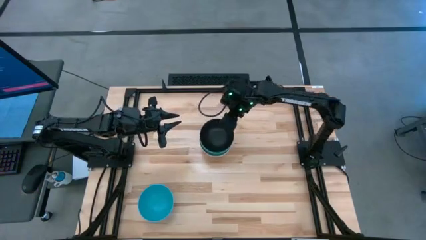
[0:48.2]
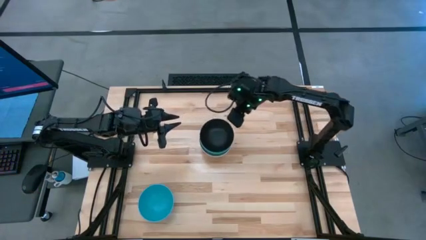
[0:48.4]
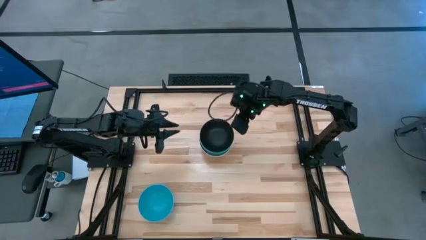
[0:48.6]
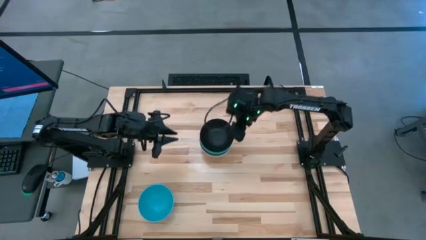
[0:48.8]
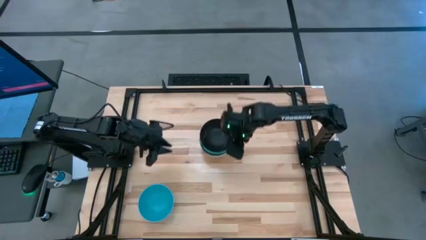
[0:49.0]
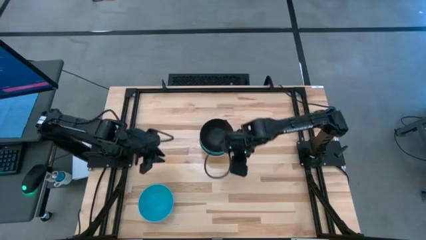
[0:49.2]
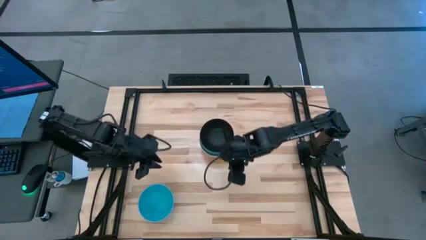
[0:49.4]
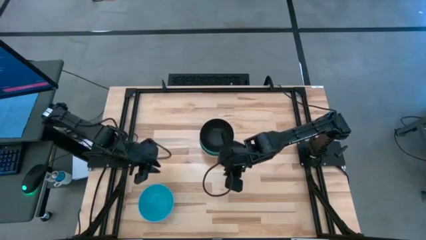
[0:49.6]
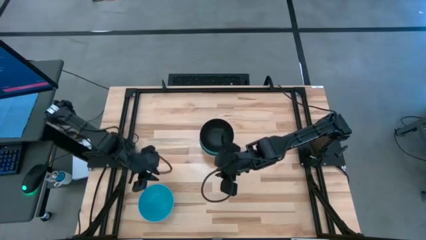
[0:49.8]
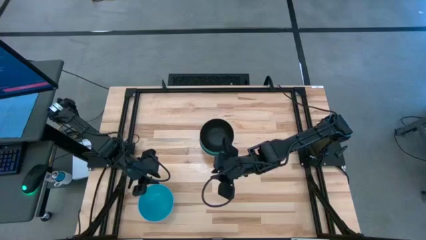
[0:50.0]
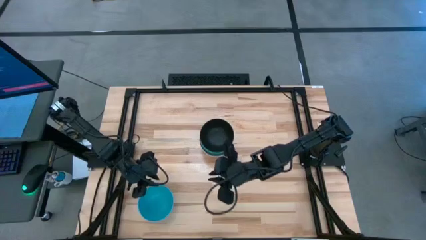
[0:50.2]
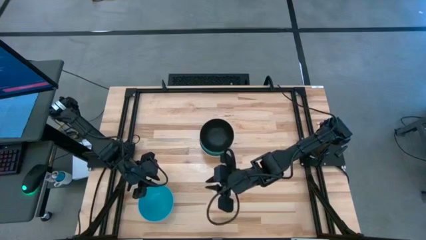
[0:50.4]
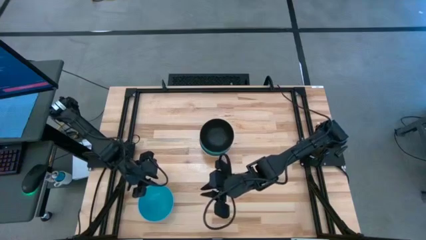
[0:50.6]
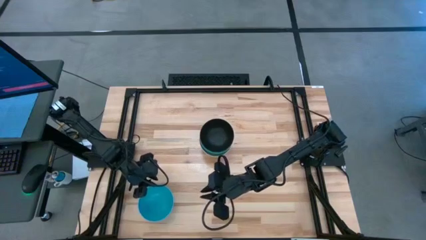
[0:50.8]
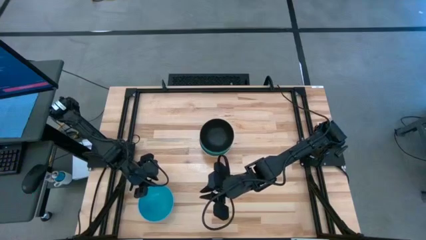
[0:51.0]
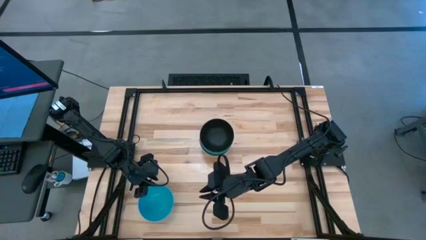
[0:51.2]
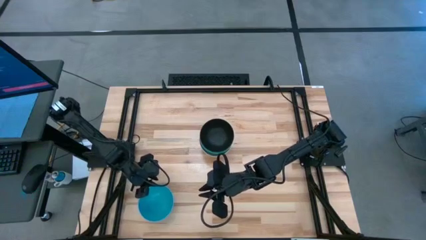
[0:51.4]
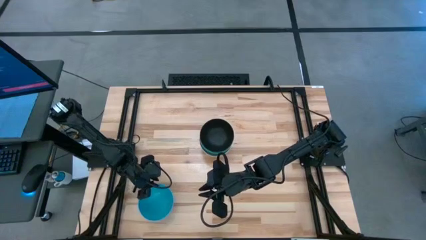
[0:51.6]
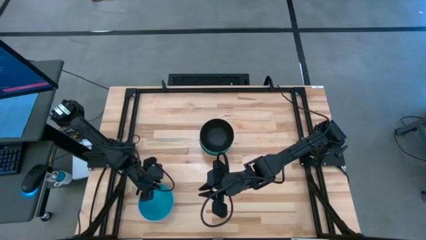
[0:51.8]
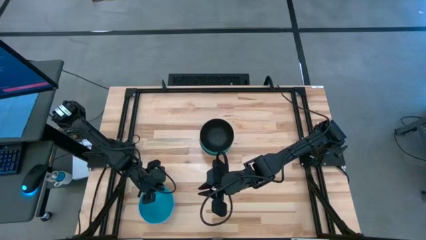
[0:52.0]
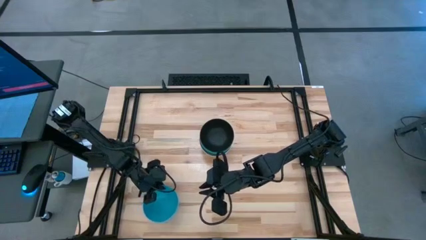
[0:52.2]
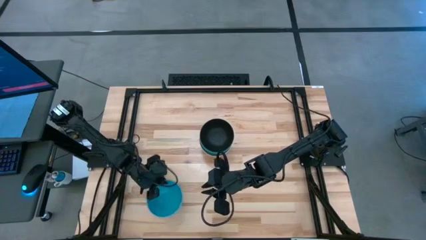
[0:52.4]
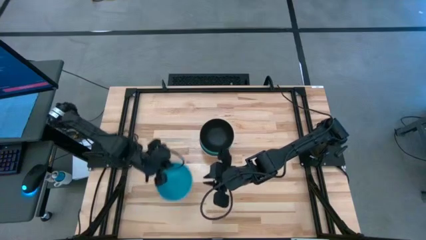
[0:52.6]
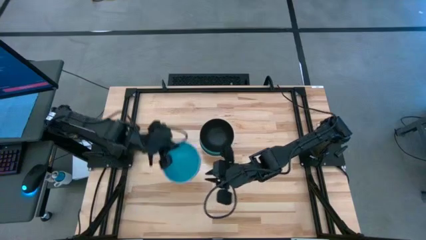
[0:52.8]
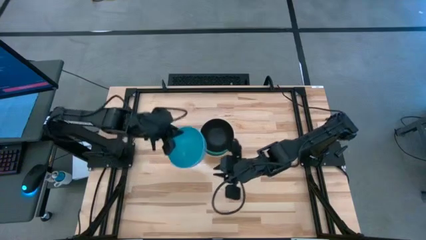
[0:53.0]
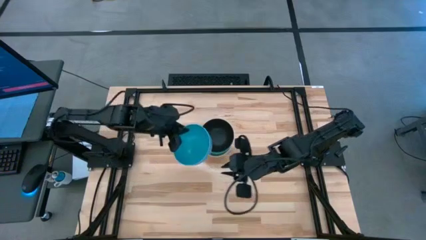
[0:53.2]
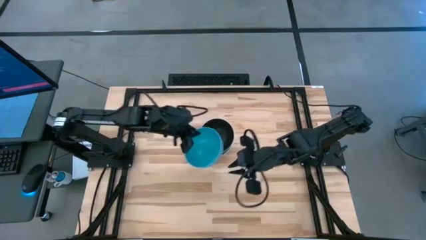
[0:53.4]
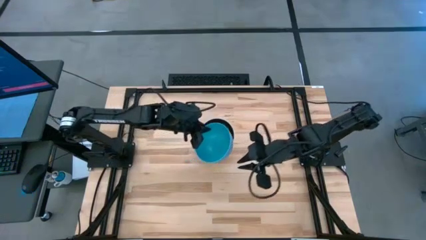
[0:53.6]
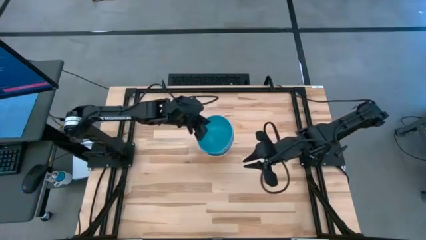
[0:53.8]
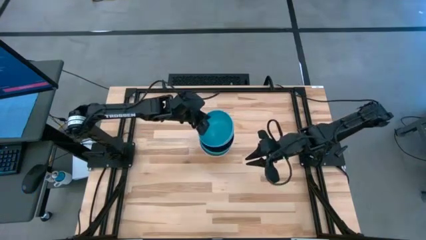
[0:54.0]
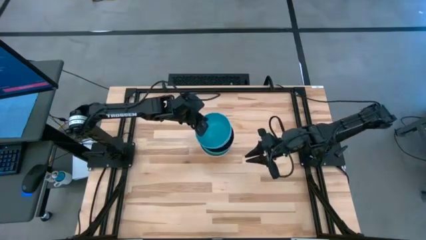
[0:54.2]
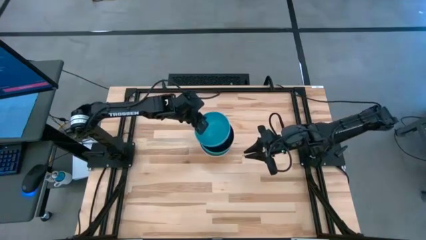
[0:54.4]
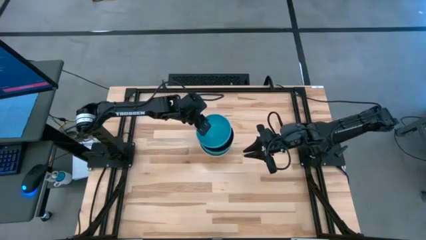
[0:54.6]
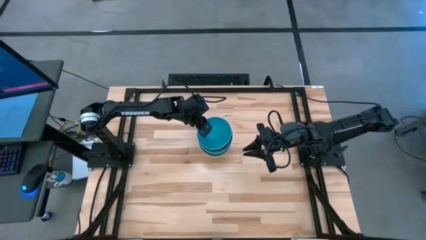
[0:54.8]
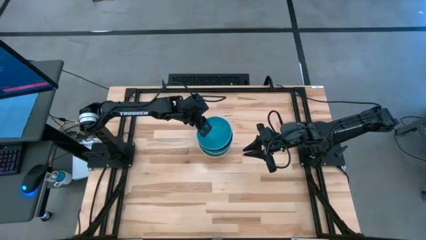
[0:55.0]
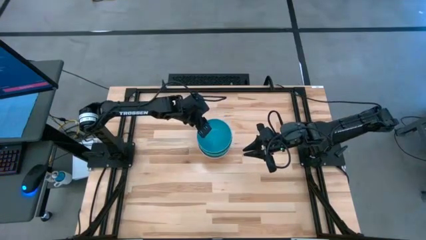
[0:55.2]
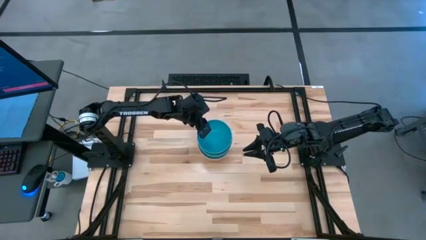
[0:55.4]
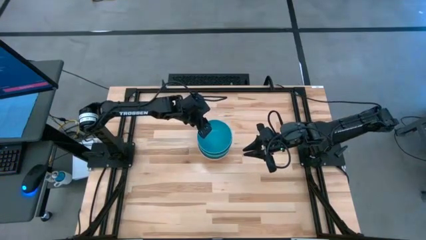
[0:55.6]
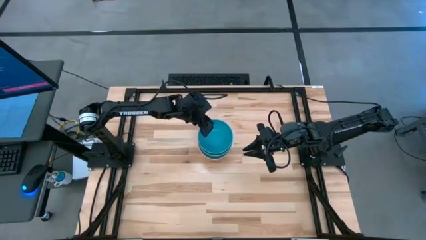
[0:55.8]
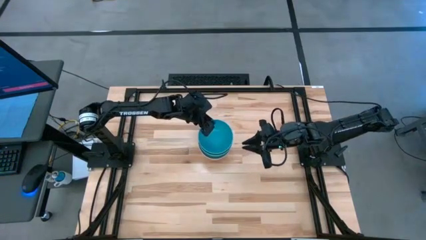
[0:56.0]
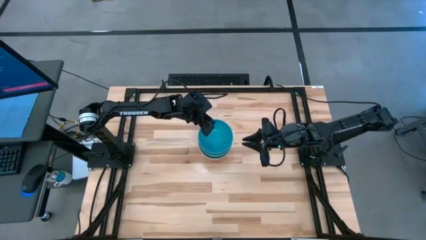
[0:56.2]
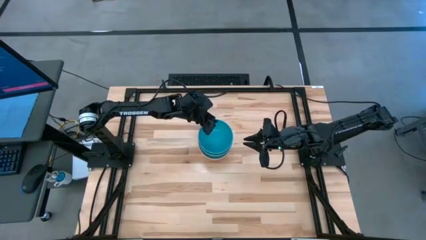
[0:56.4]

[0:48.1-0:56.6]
Task: Nest bowls inside each other
Stack the blue bowl on the black bowl

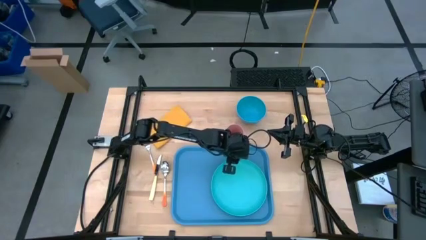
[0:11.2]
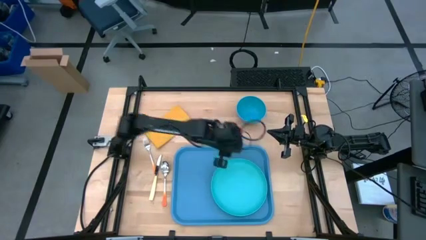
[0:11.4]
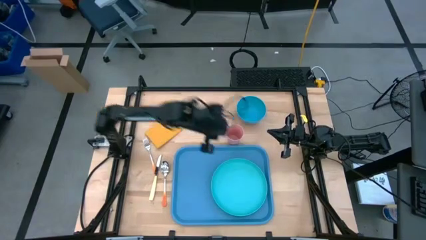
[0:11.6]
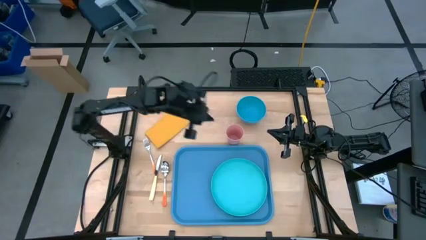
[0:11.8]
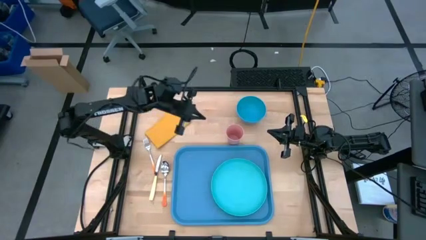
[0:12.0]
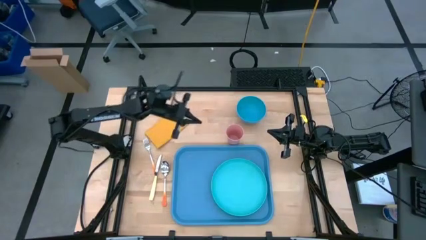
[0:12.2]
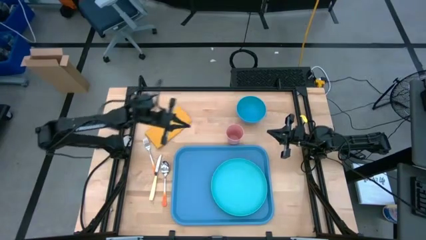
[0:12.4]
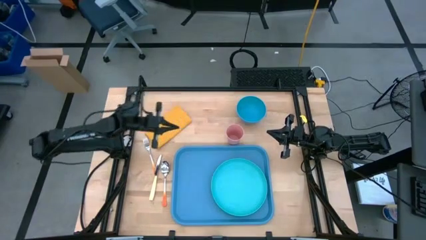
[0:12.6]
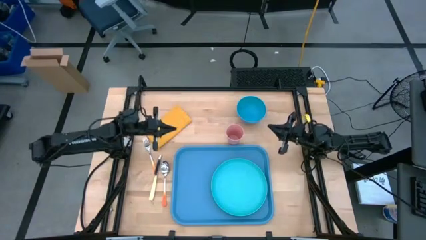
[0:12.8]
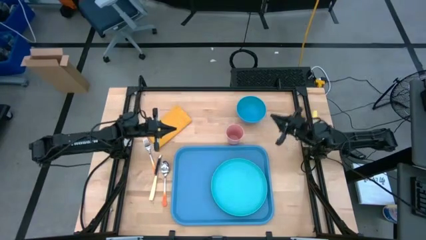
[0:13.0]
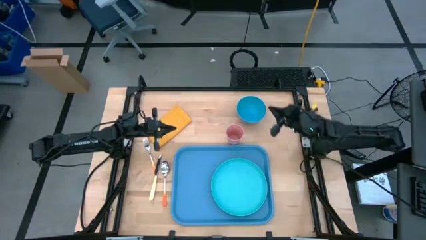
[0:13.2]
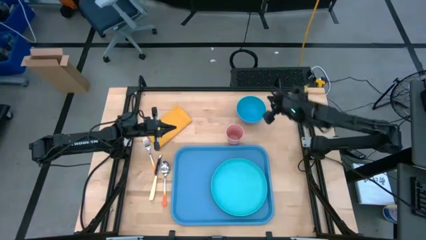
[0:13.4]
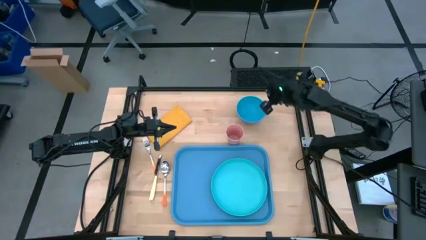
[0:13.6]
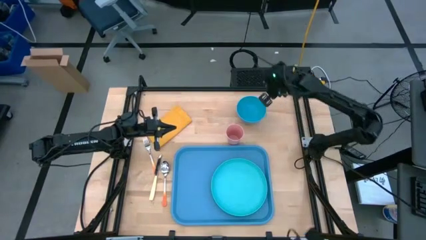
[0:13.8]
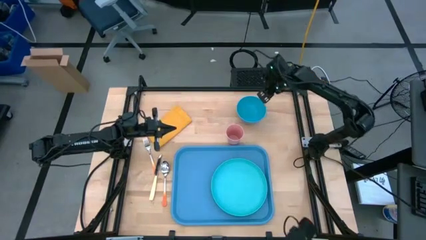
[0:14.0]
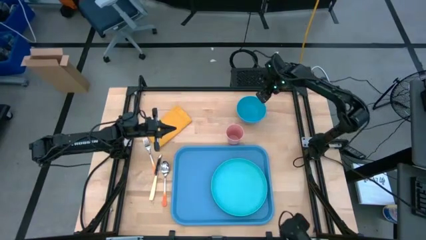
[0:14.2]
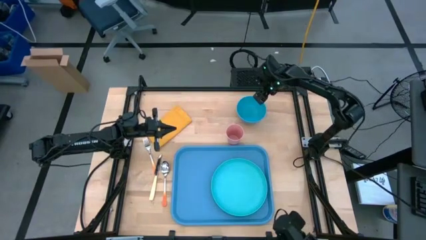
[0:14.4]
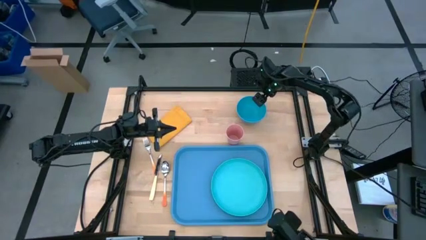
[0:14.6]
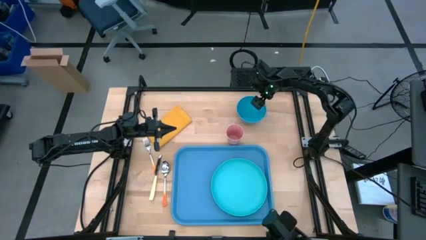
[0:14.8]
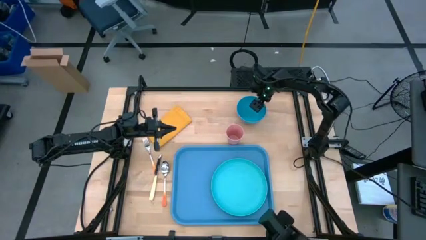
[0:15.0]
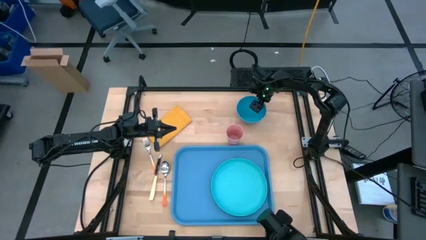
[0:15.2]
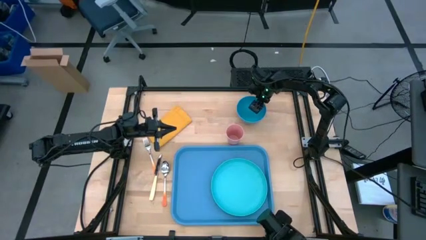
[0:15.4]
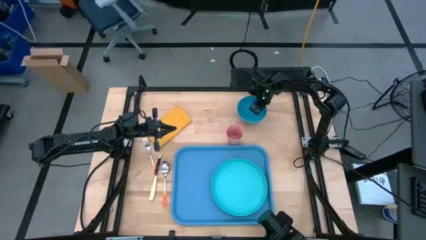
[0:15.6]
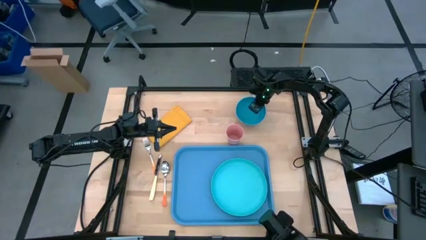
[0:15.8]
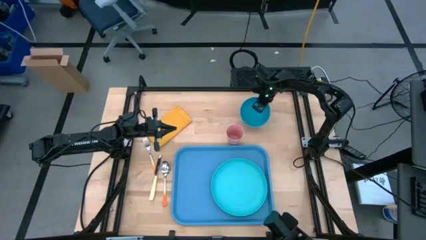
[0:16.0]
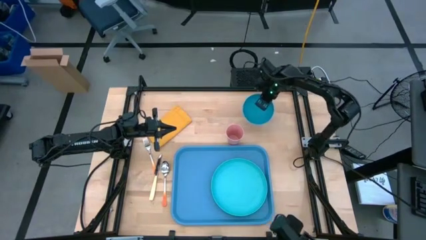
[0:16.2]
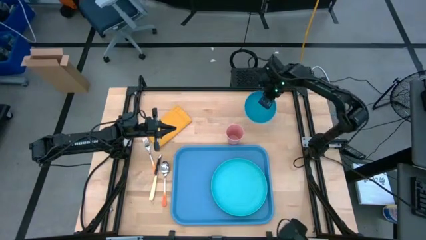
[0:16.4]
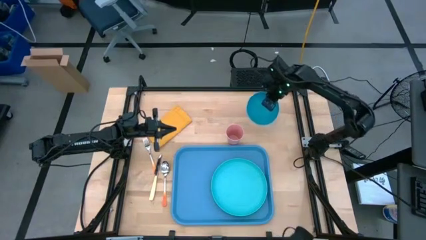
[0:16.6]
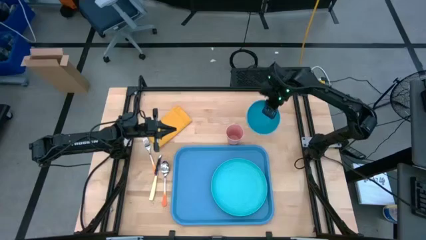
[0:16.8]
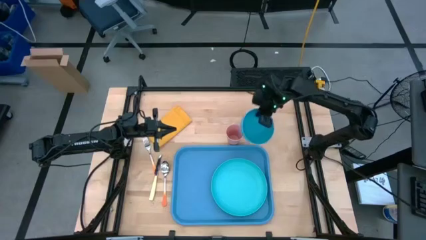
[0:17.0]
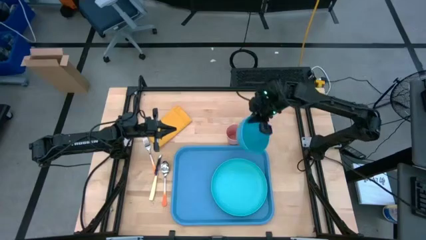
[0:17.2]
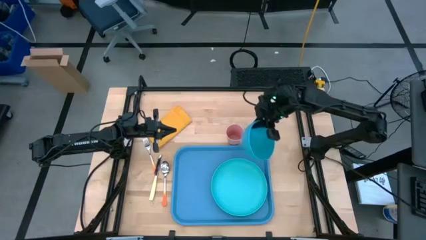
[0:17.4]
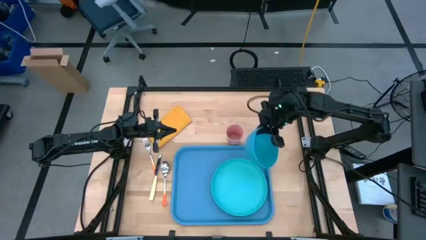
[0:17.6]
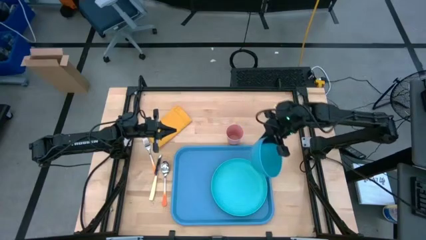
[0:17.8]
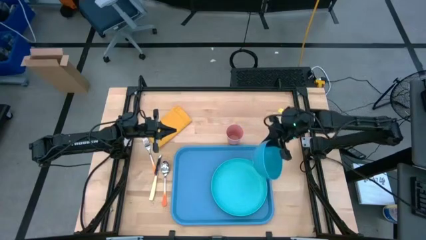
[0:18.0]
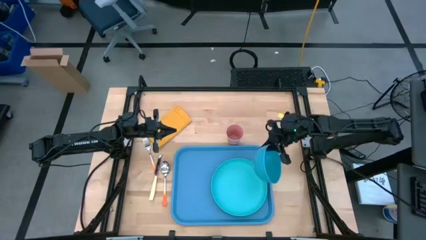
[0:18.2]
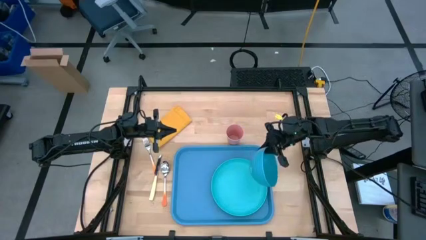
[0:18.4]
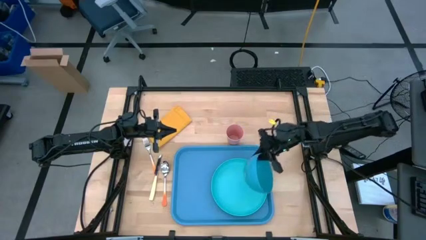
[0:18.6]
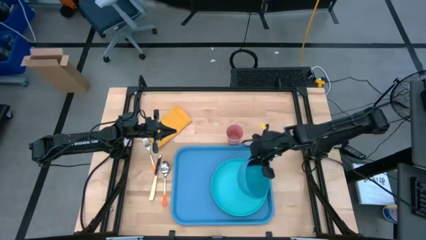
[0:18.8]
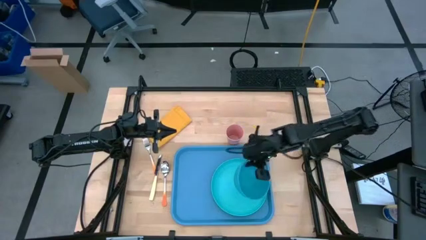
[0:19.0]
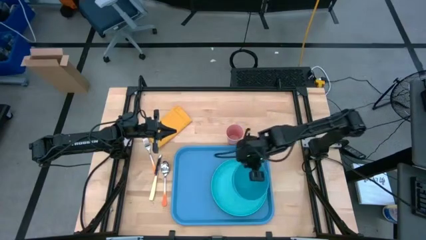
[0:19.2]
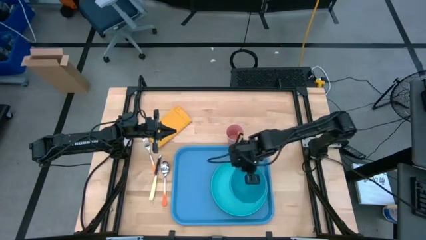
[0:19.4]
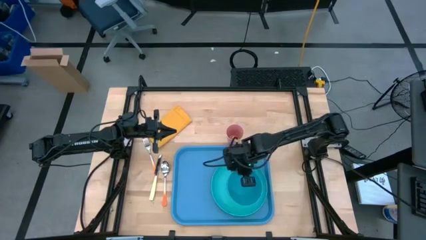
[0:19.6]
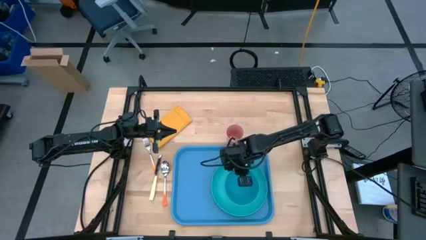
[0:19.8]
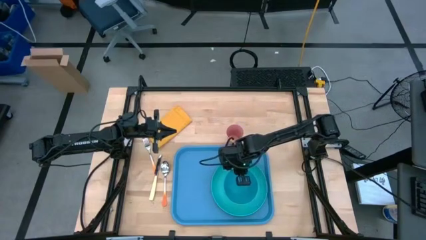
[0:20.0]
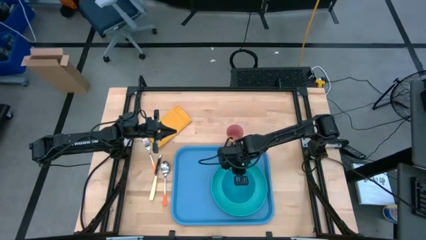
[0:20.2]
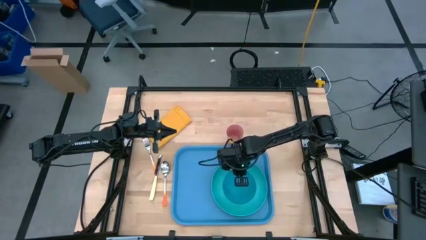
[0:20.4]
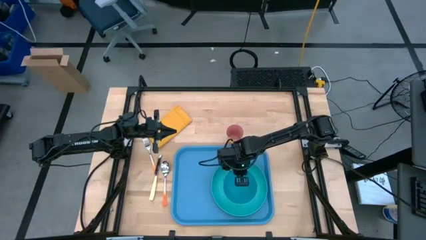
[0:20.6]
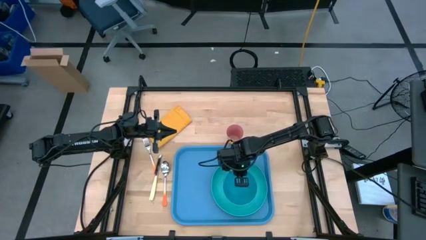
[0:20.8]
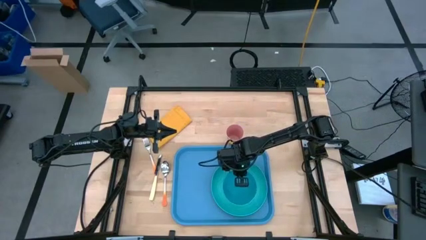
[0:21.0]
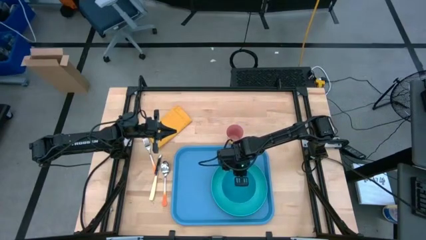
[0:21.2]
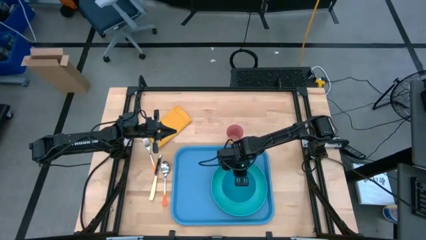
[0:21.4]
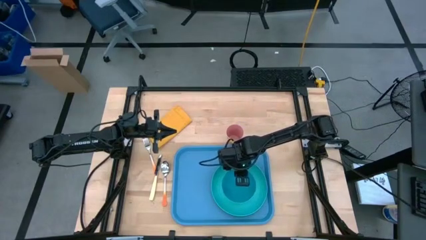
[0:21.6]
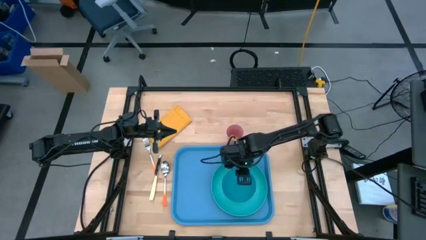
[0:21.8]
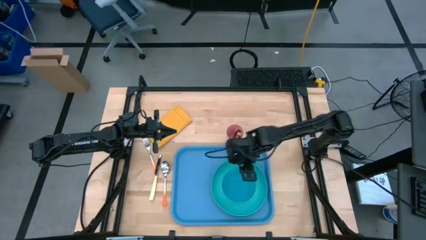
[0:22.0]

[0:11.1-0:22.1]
Task: Set up tray
Put the blue bowl on top of the light blue plate on the blue tray
